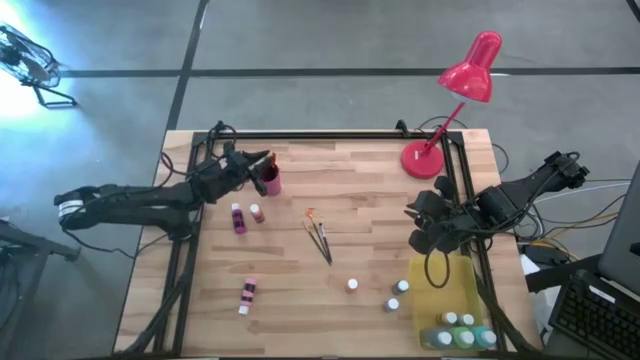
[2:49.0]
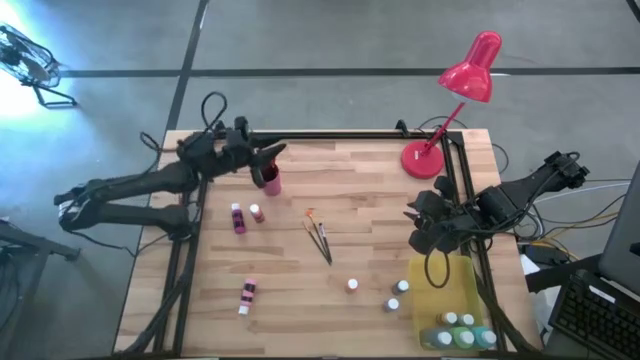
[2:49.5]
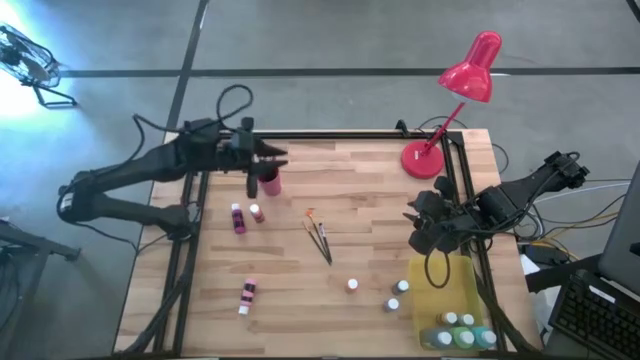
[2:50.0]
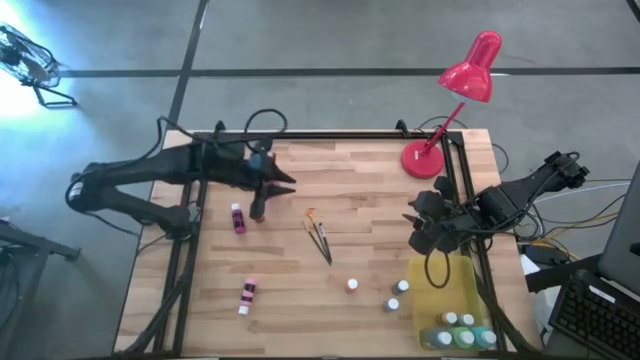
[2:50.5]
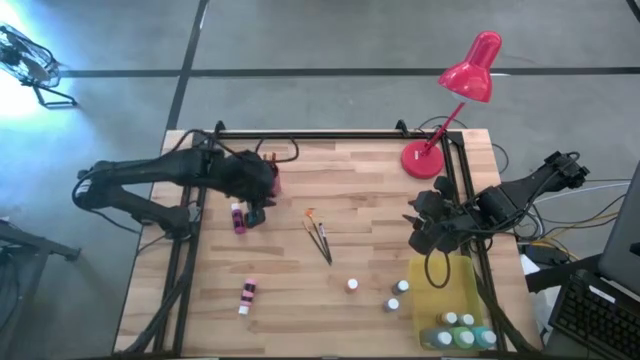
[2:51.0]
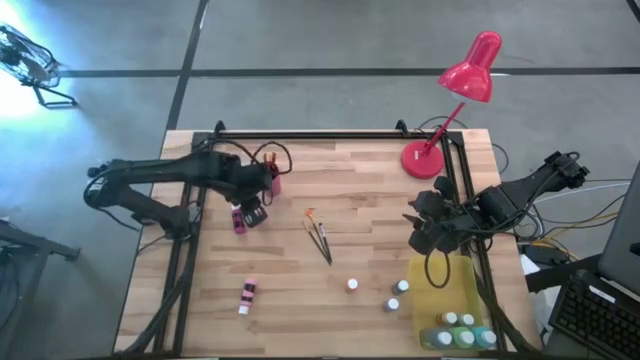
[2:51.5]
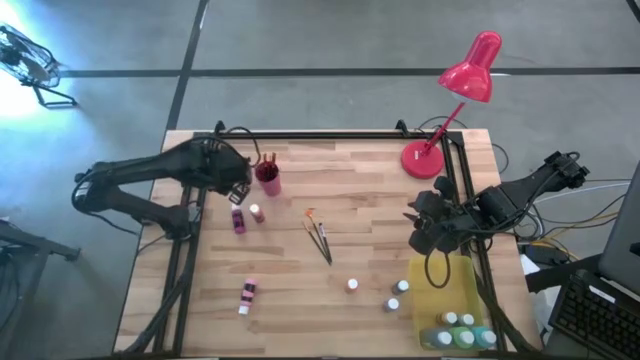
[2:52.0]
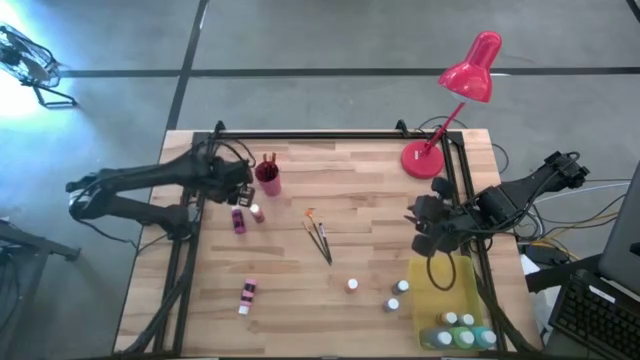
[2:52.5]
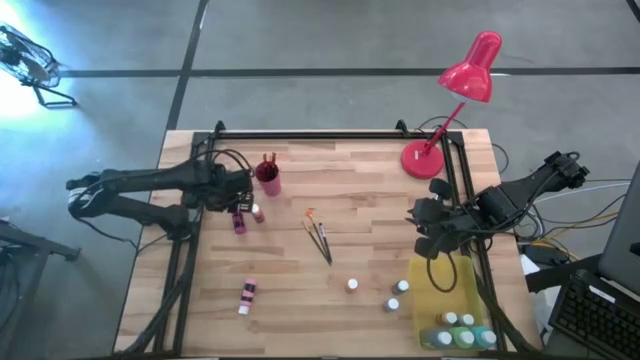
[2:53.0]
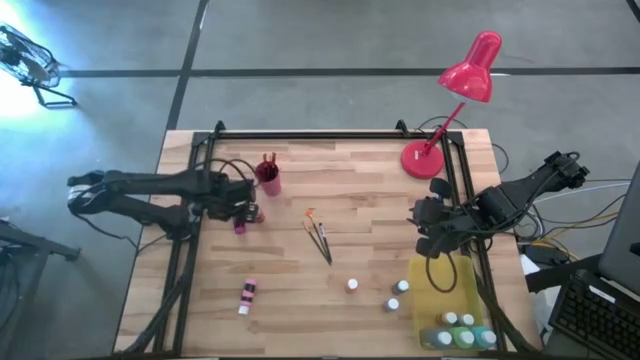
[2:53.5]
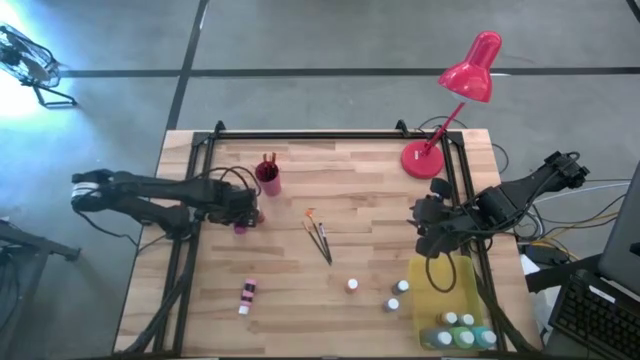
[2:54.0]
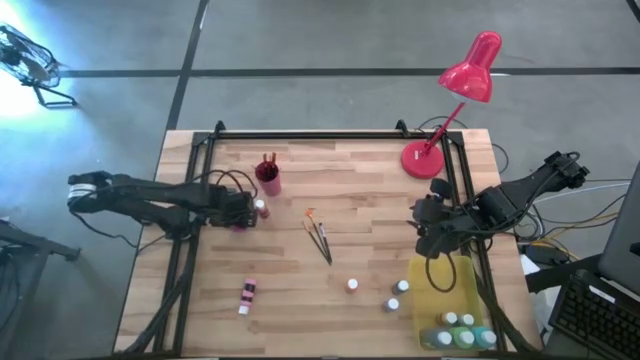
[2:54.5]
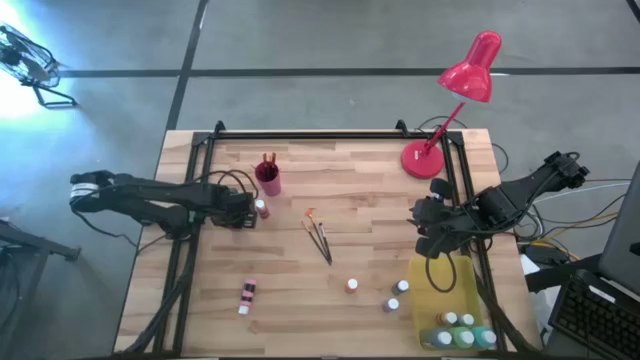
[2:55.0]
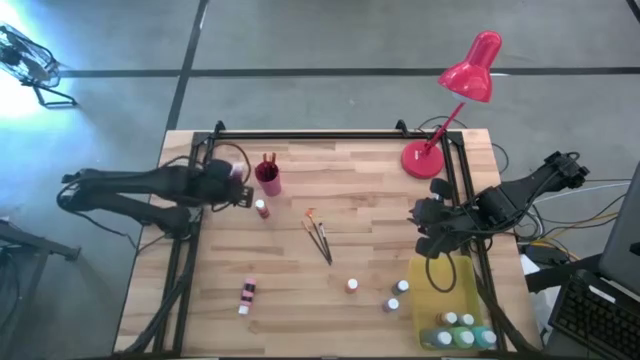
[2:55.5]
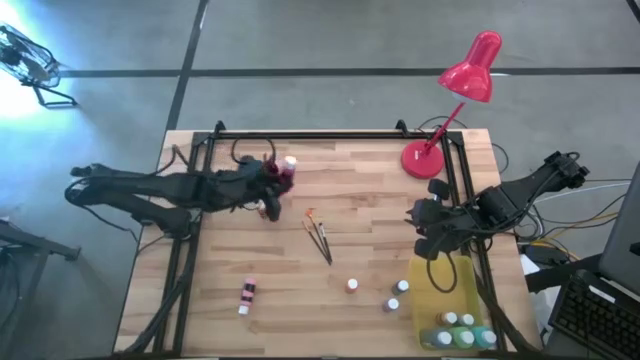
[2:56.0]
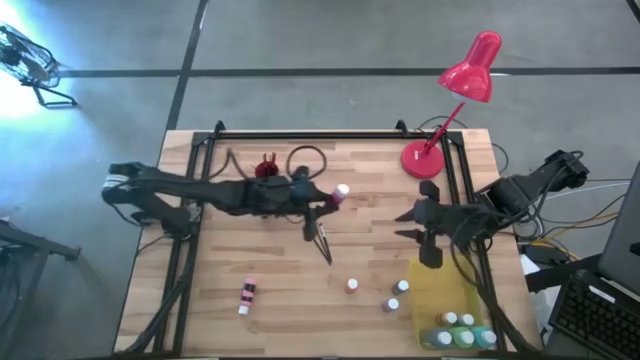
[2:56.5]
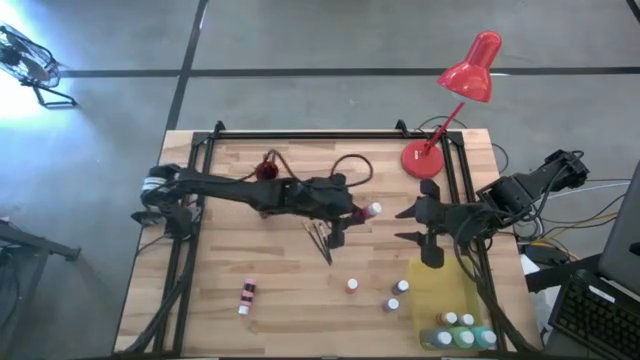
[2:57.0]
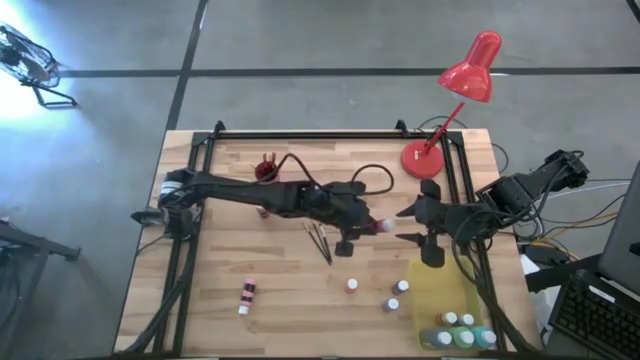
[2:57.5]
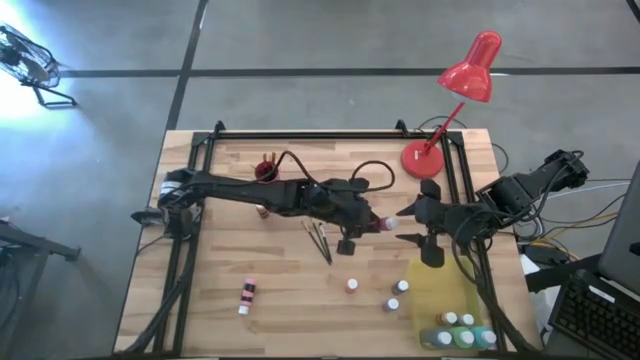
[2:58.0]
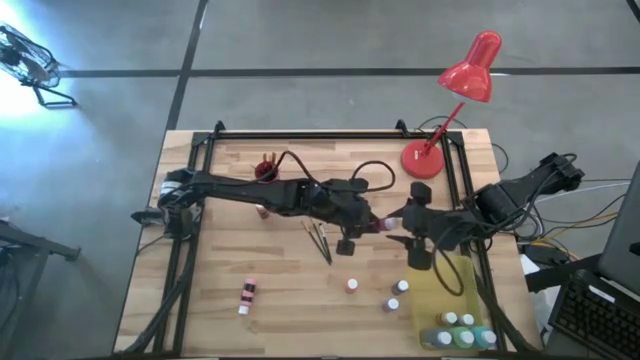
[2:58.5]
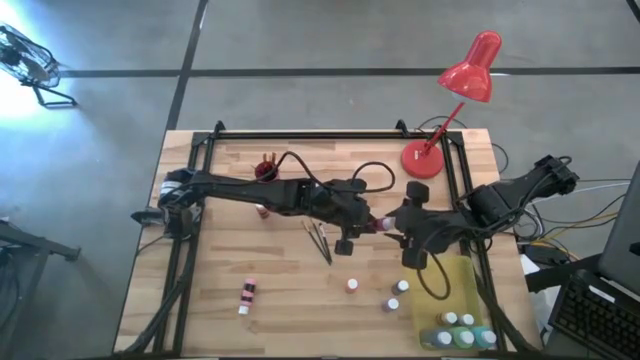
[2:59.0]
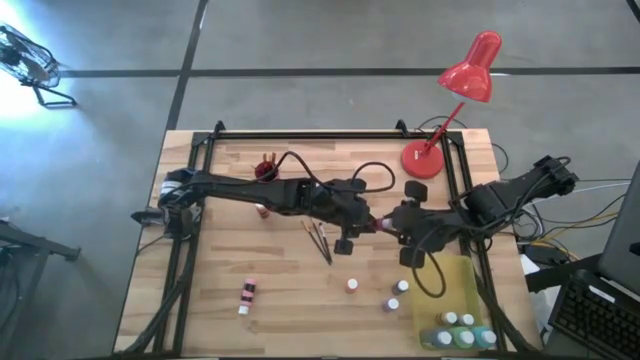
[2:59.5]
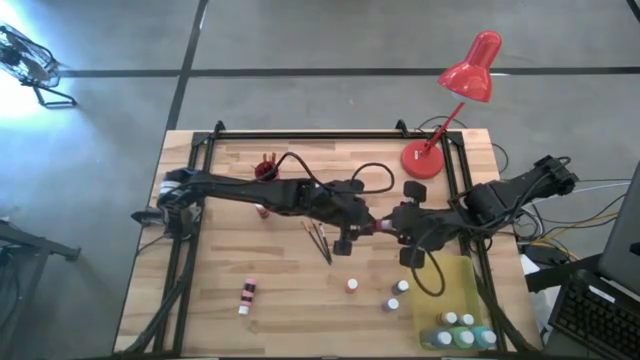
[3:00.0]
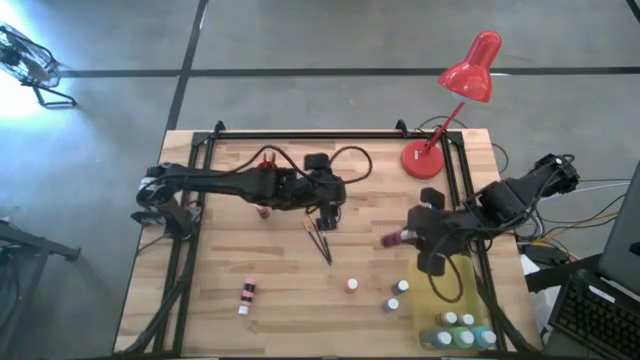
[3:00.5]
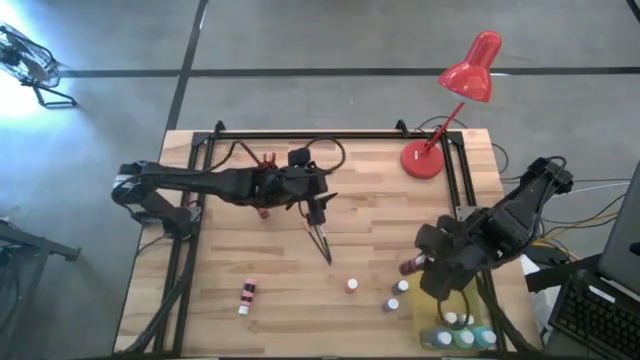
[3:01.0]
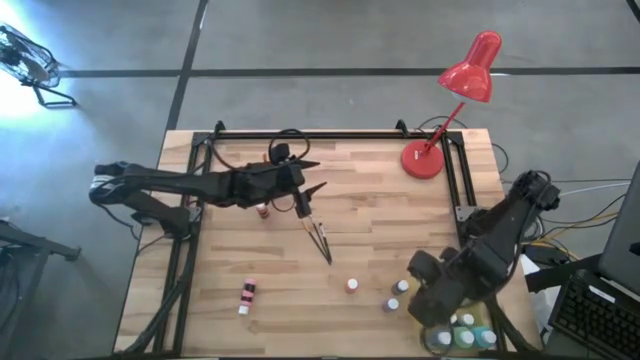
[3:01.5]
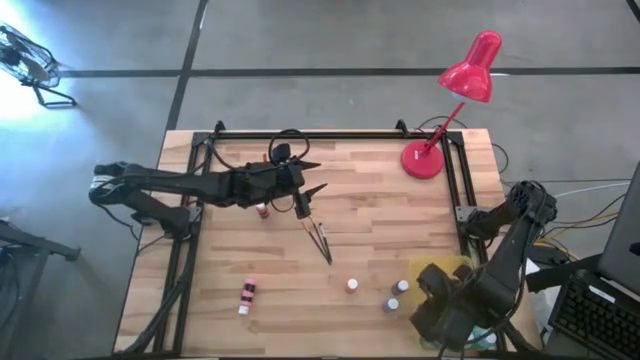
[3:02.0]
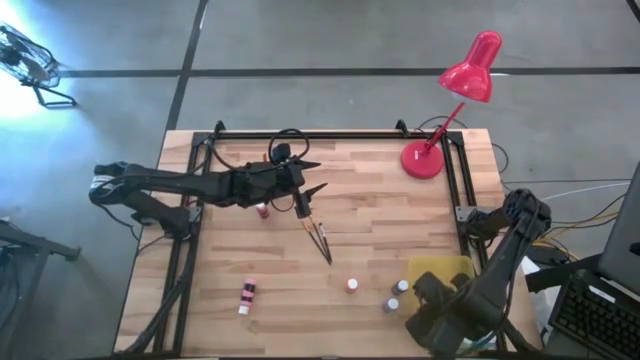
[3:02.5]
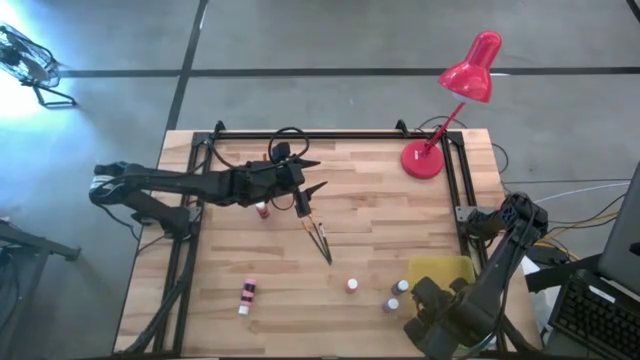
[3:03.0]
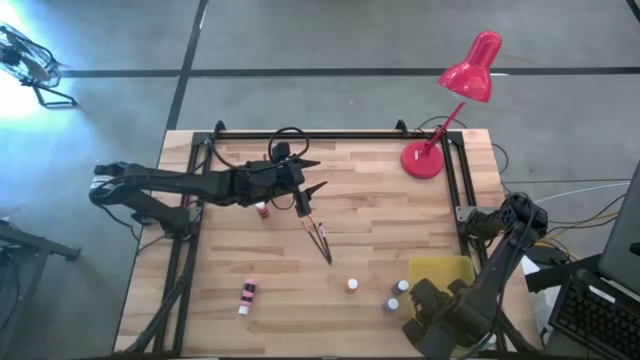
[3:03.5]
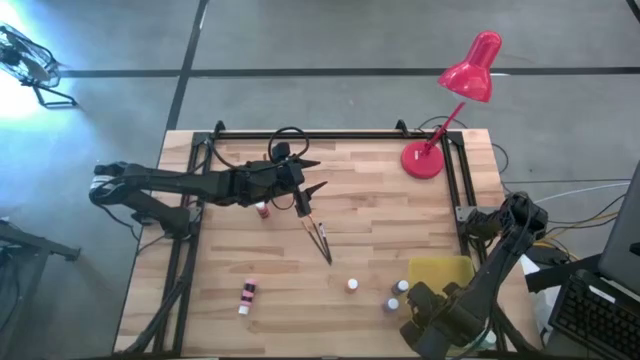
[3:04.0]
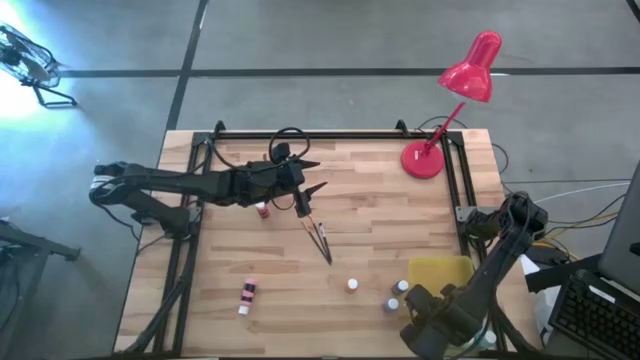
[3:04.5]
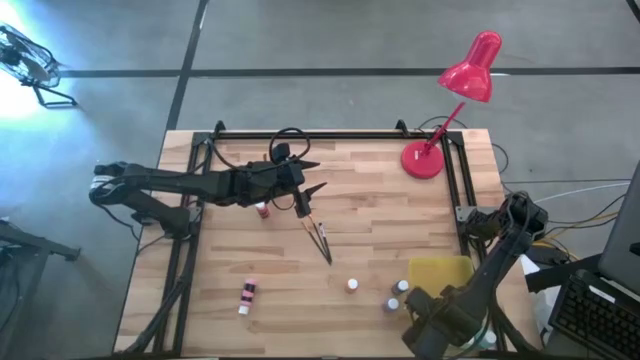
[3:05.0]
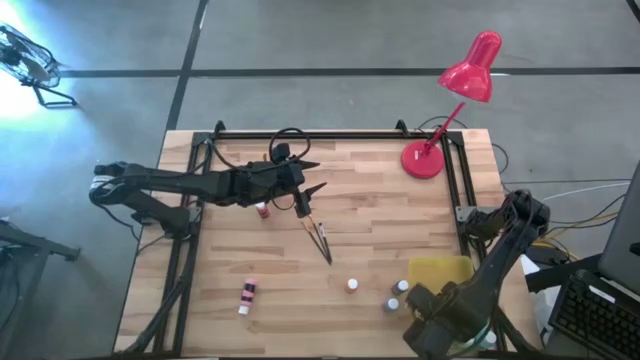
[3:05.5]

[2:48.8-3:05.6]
Task: Pick & Place Paint Supplies
Put the dark pink paint bottle into the yellow bin

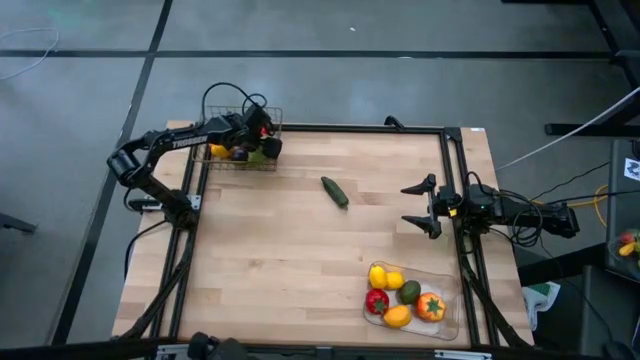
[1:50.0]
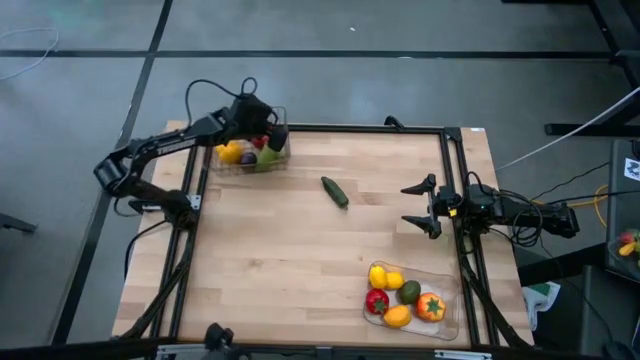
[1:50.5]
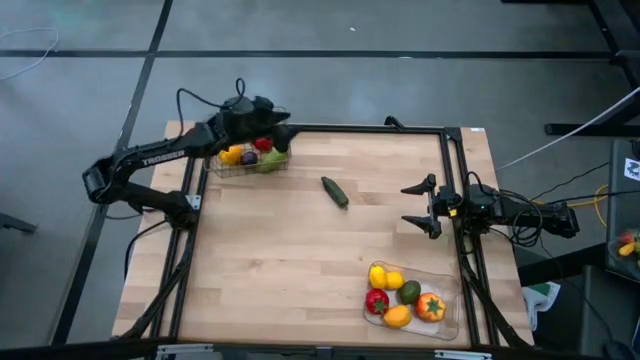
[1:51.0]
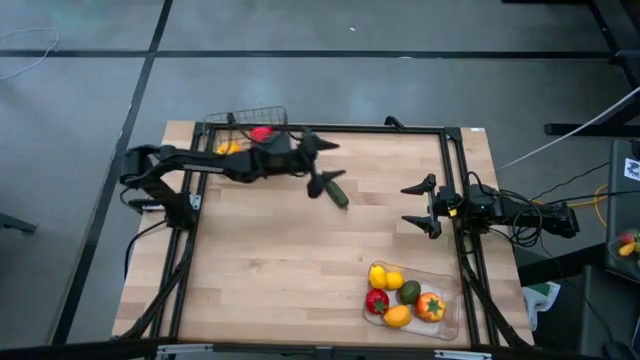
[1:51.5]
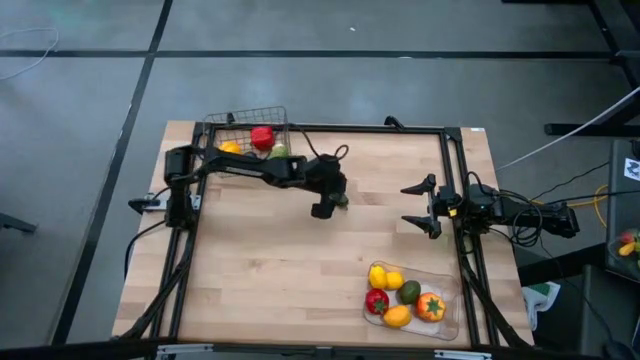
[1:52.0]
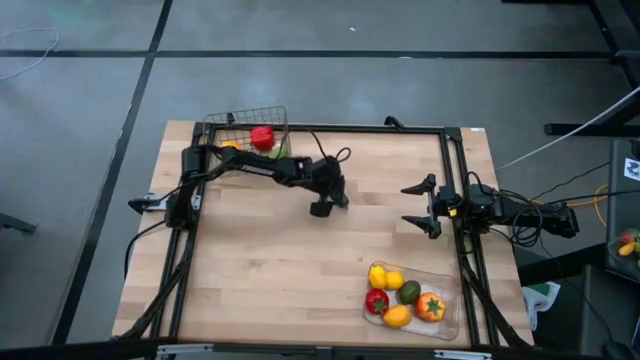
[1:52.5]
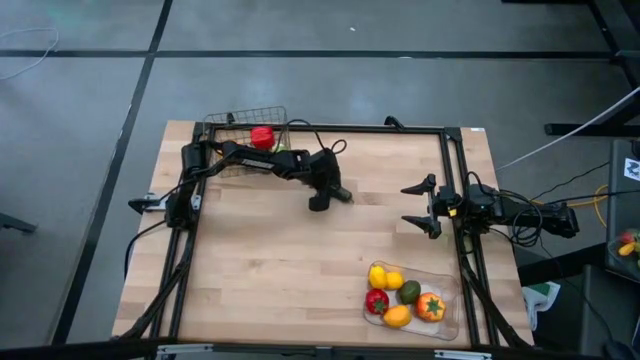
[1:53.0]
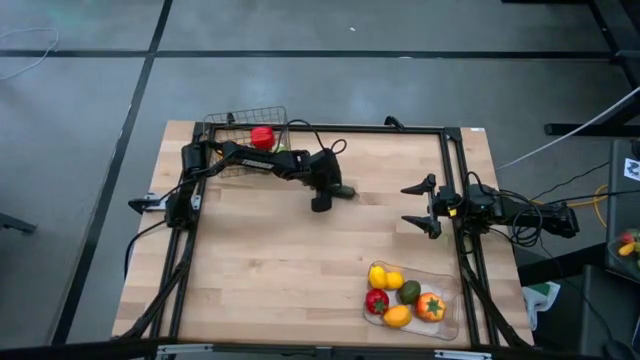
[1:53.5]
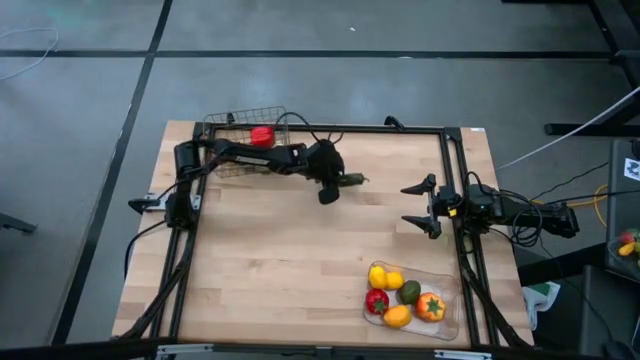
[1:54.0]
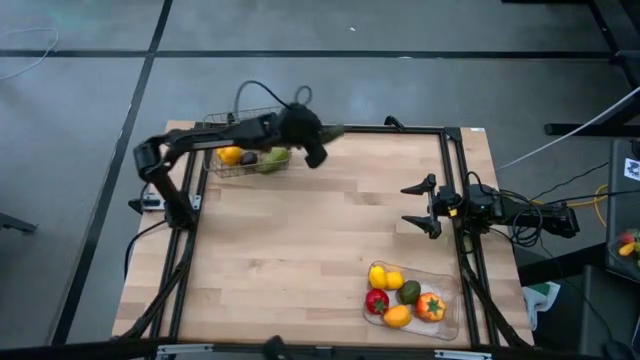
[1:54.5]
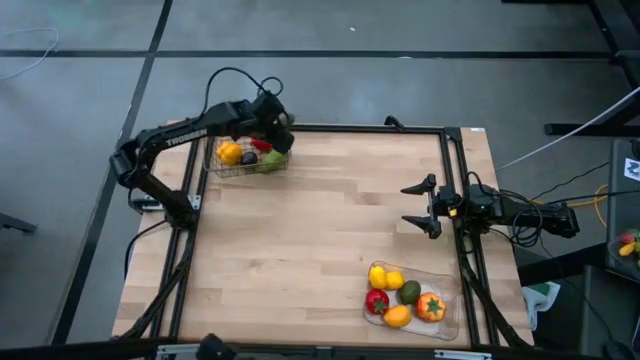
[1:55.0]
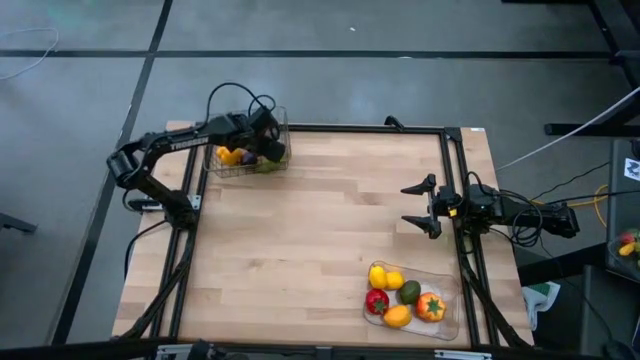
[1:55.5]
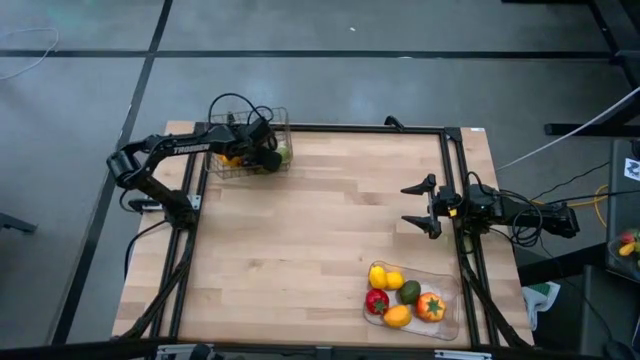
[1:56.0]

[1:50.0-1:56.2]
Task: Sort produce into baskets
Put the green pepper into the mesh basket
